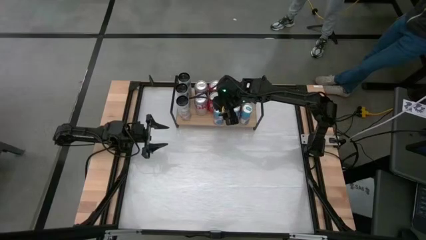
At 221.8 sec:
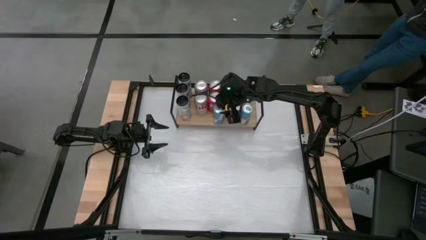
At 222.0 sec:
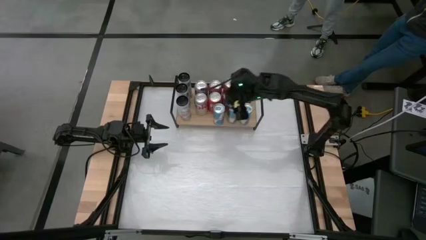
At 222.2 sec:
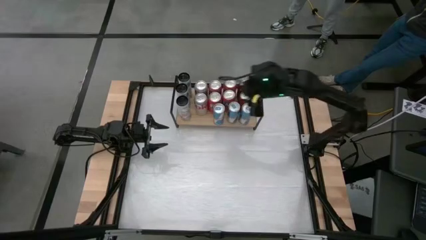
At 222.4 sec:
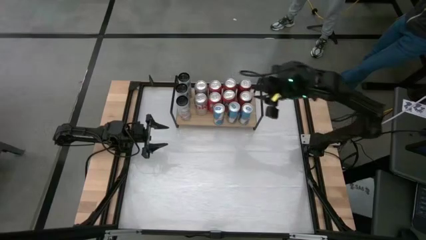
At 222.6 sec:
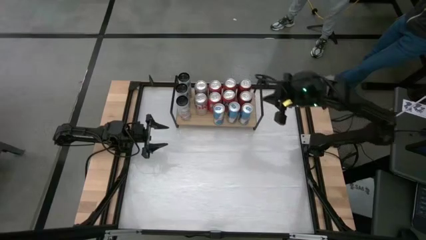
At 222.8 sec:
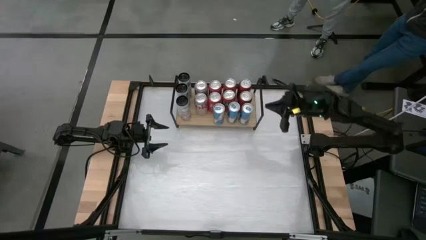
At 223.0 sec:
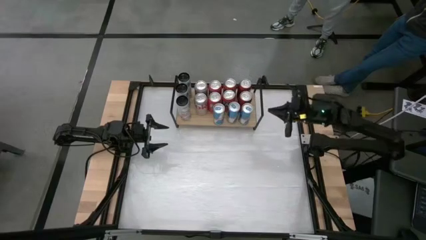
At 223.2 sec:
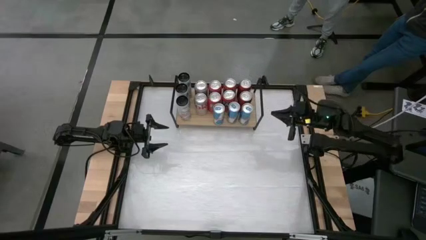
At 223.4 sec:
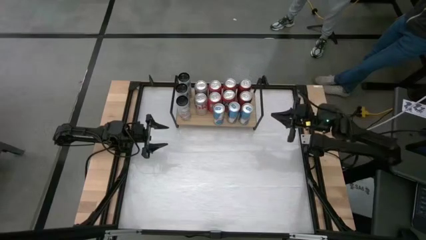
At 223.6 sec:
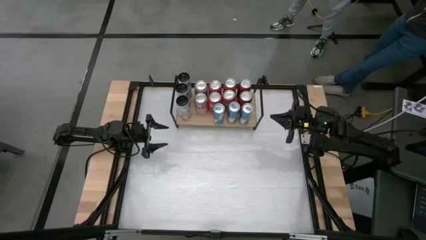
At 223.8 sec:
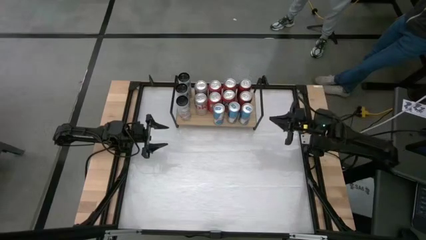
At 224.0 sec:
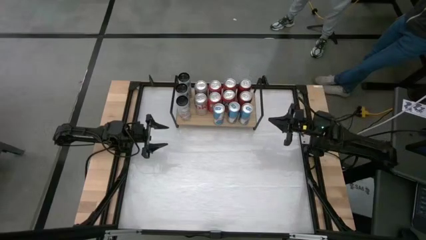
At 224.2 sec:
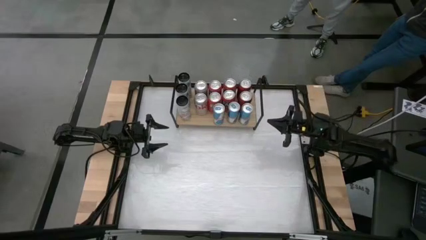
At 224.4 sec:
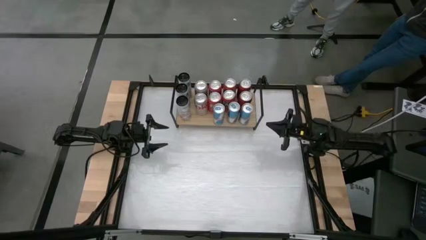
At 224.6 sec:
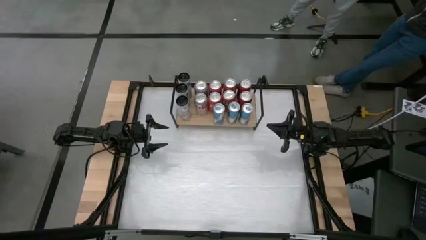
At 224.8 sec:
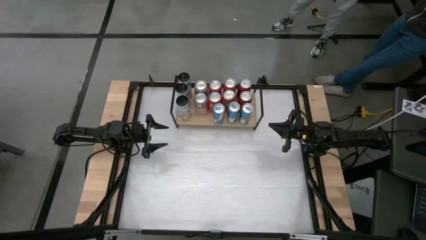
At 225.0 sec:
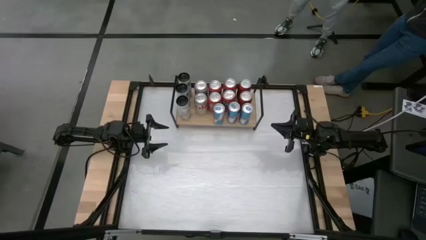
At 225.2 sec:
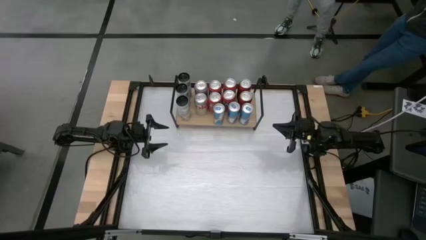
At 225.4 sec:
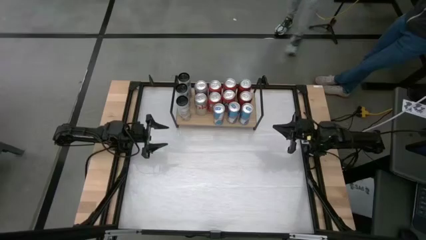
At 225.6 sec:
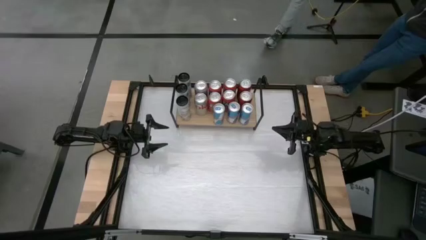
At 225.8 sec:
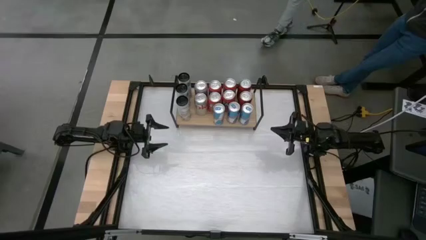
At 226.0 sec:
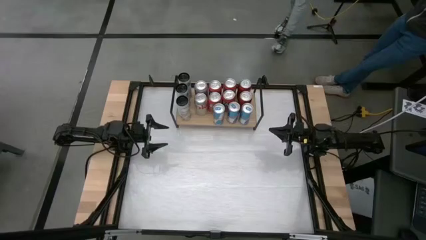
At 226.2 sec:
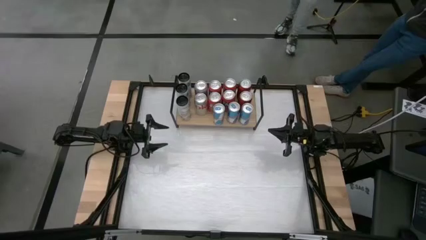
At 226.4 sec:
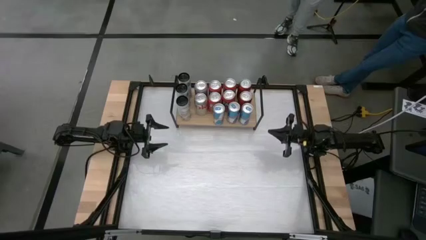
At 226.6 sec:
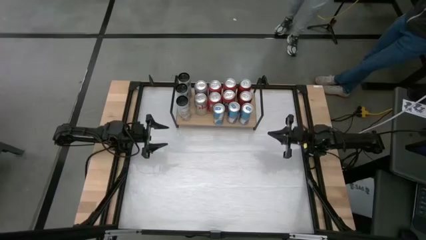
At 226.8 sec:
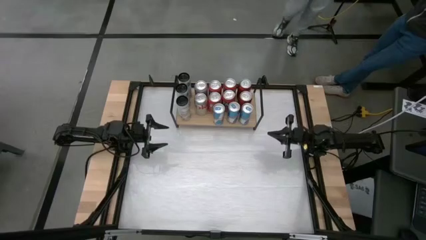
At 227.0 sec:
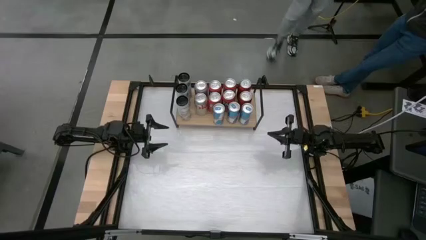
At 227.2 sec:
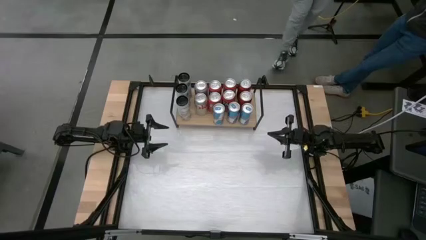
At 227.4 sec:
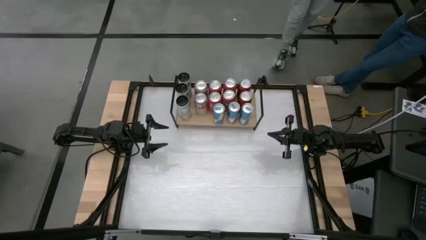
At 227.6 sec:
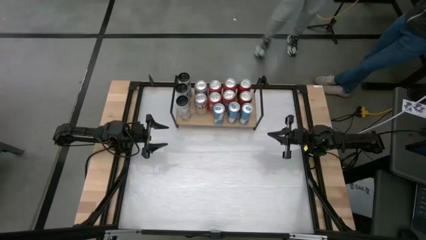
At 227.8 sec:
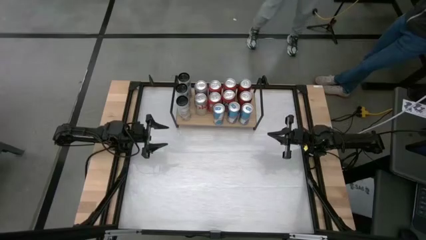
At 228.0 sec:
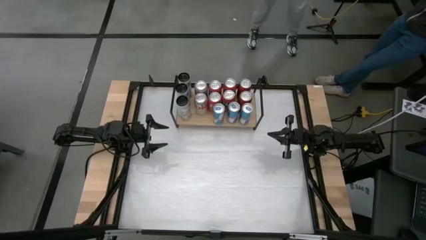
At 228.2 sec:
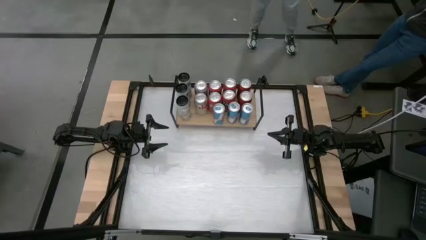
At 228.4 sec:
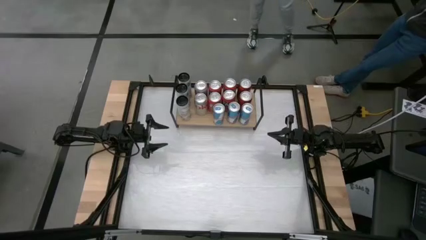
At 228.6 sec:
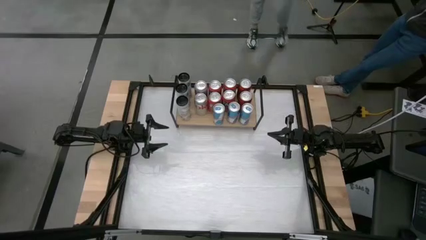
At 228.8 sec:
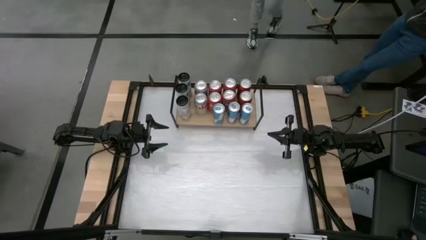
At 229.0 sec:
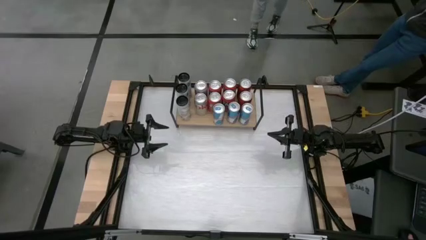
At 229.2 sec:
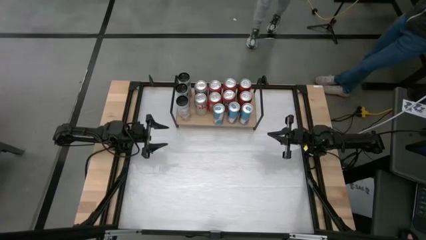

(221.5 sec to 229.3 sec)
Task: Place canned beverage on shelf
Return to Home Position

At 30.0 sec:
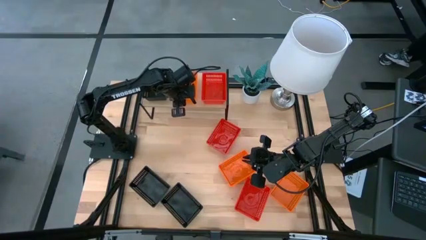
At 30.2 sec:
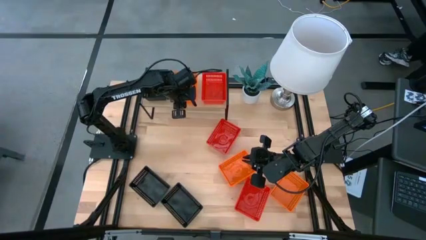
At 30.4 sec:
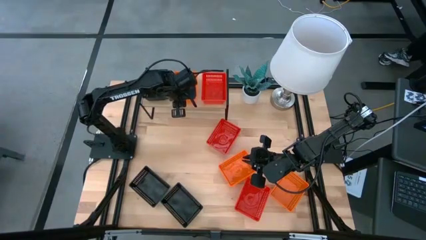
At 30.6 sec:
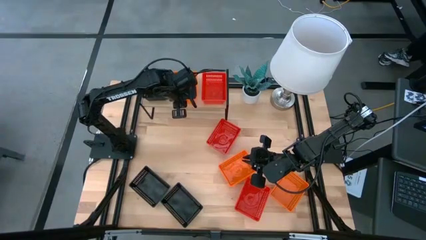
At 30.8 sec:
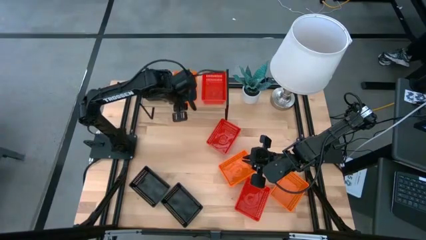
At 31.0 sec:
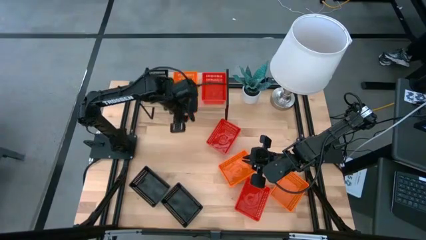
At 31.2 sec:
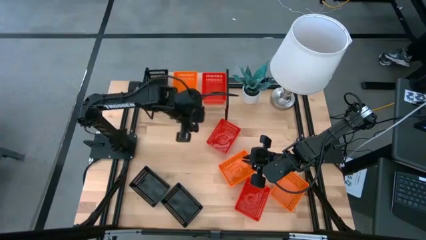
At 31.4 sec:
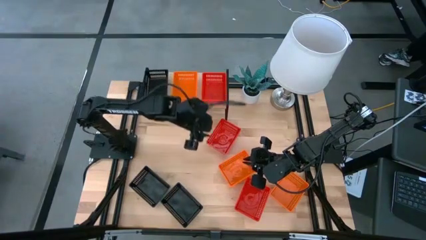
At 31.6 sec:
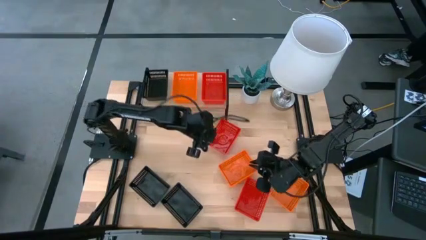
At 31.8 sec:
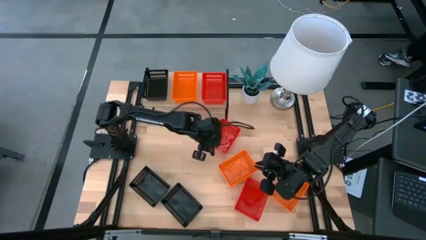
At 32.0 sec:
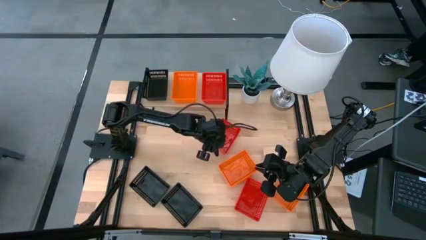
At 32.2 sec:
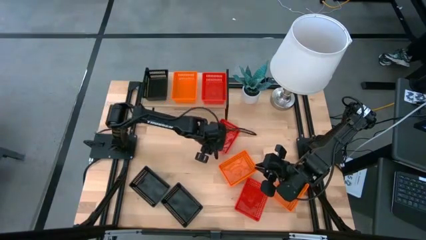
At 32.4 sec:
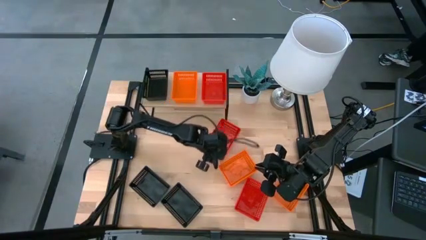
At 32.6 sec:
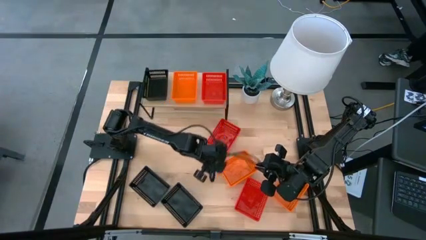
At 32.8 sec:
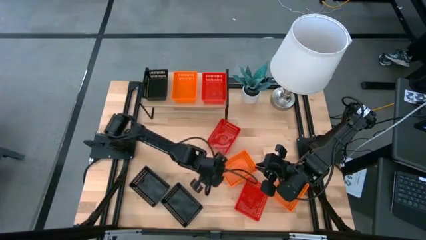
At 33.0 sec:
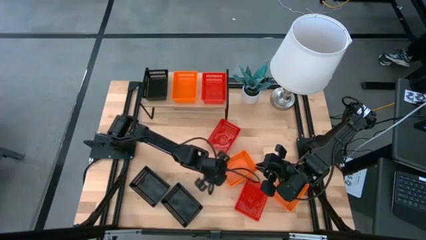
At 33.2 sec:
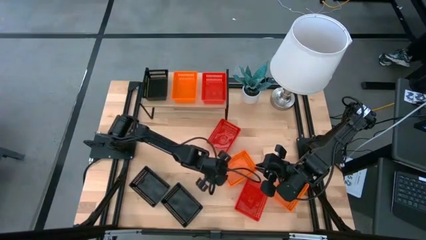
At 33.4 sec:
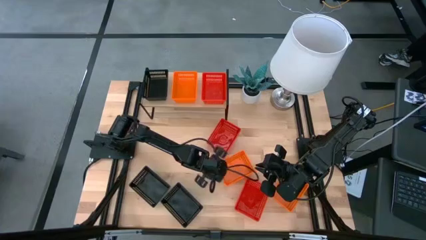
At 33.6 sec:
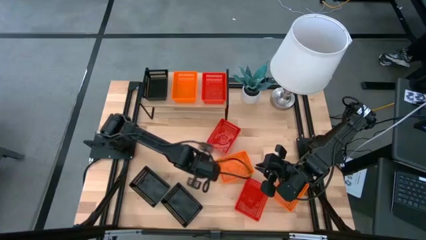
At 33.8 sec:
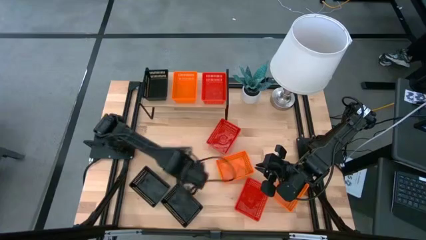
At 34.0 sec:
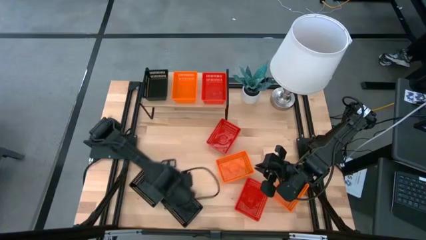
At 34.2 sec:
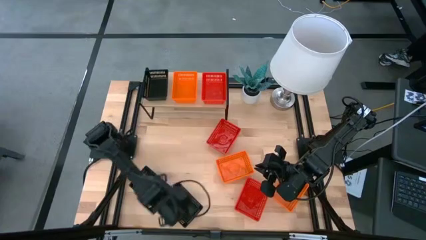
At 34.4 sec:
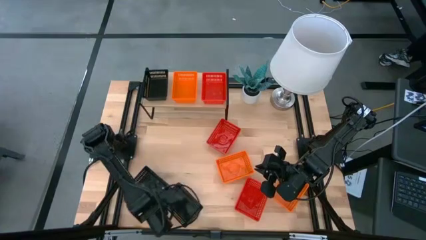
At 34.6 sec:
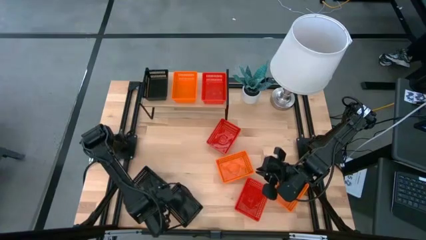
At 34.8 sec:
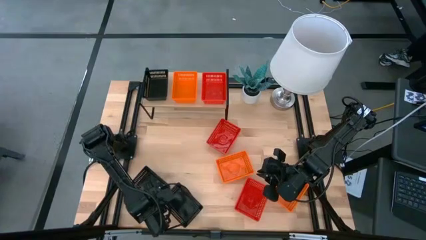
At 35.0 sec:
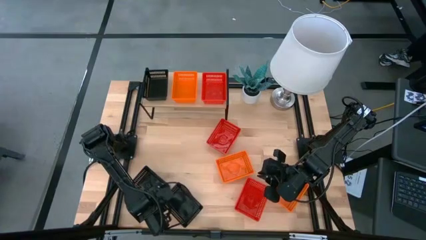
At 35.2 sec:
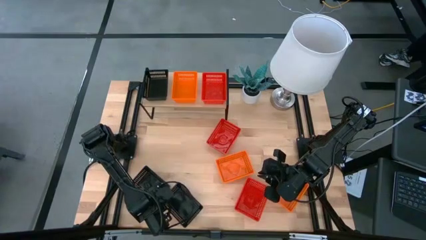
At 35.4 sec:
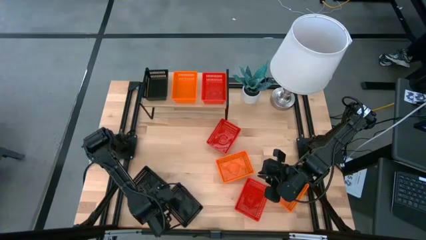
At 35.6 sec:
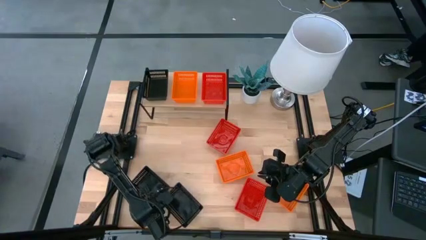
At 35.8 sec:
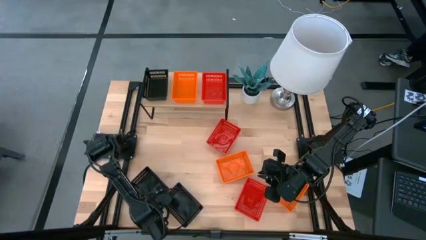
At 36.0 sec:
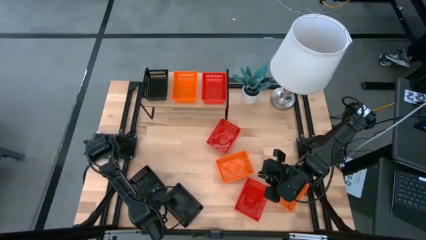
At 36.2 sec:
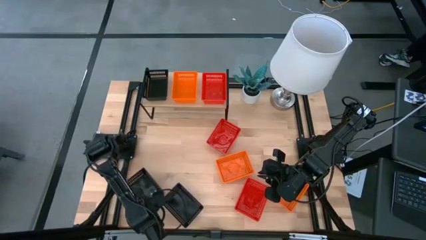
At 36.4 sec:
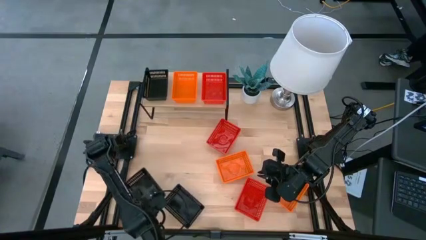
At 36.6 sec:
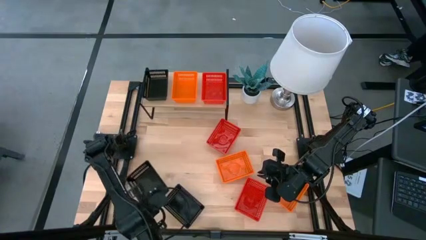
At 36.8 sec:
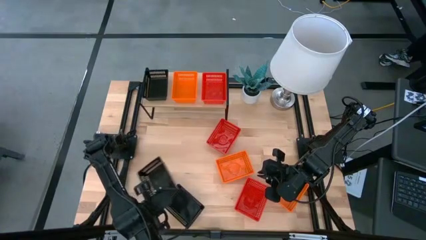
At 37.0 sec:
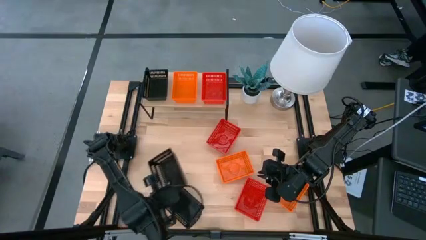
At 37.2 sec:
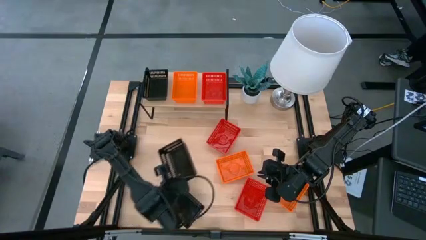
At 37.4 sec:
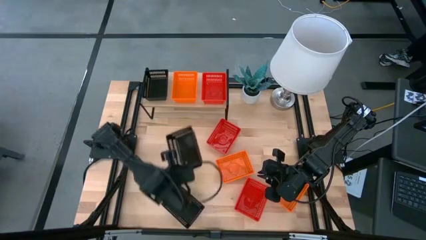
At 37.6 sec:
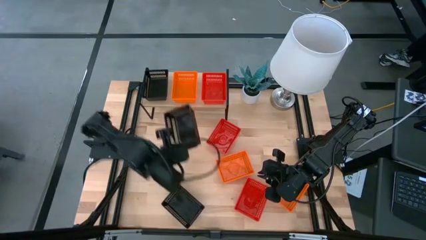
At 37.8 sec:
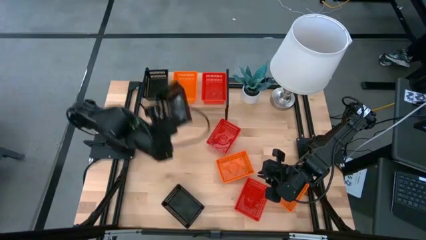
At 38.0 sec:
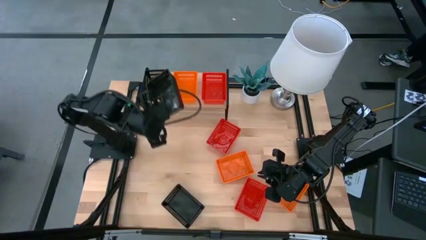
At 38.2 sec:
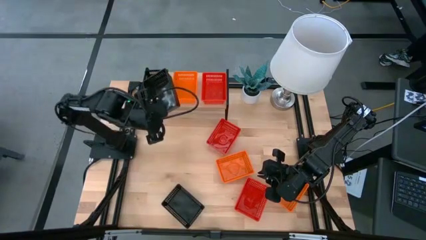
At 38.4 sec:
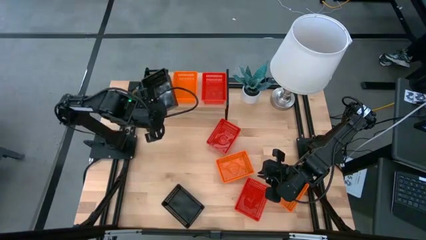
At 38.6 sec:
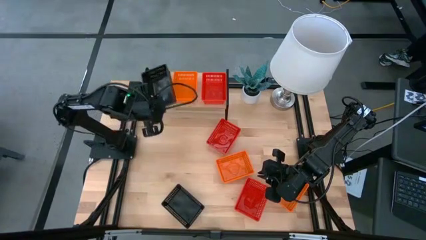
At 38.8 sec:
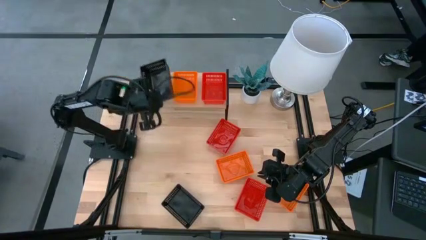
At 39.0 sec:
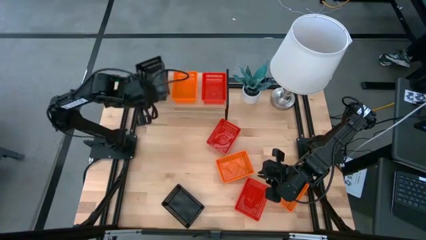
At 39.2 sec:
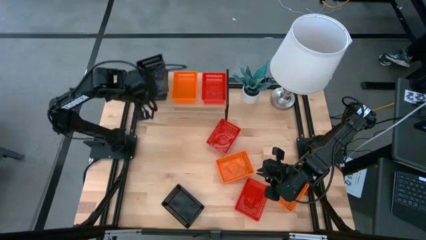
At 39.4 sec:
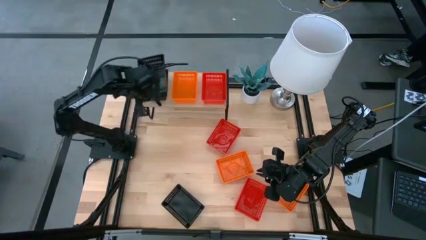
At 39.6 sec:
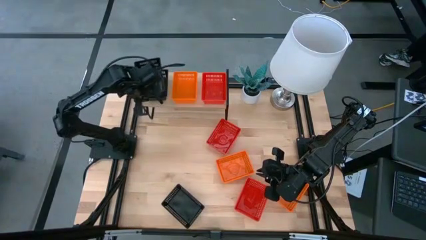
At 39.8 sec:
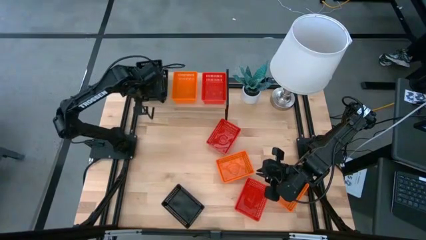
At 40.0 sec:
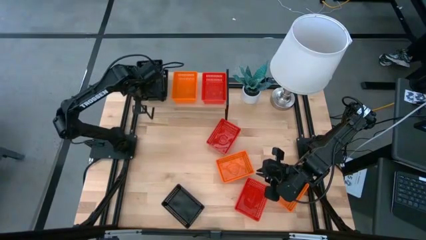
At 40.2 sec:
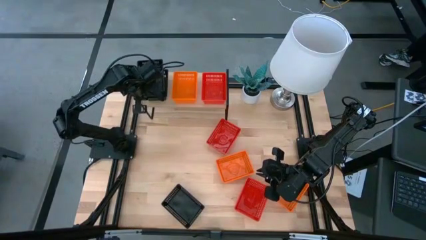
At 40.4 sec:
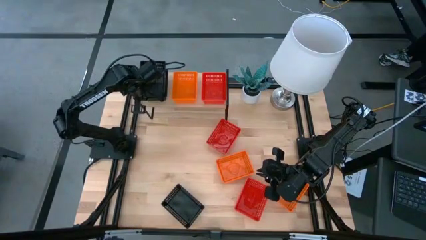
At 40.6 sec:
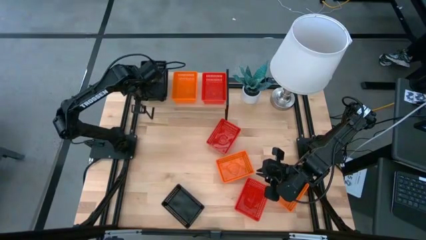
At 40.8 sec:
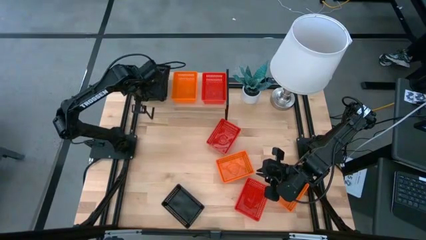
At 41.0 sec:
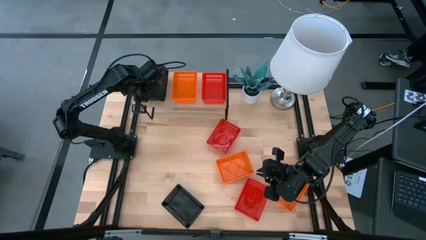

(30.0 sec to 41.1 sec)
Task: Stack baskets on shelf by color
Stack the left black bin on top of the other black bin on the shelf
